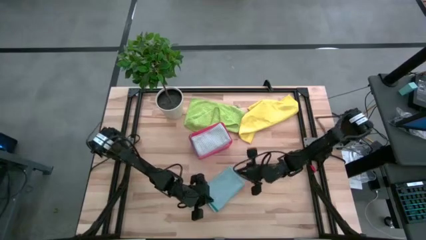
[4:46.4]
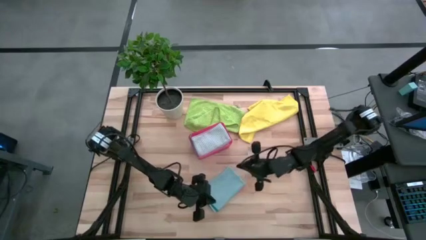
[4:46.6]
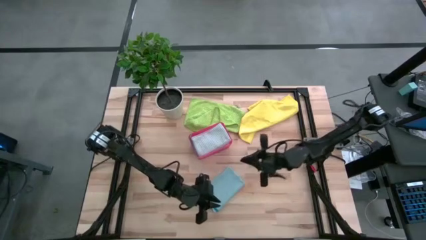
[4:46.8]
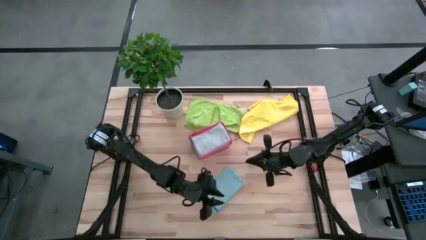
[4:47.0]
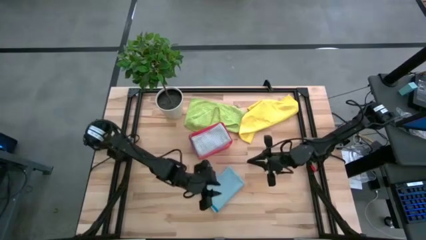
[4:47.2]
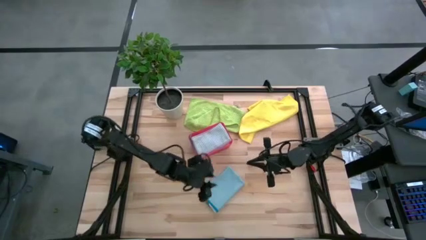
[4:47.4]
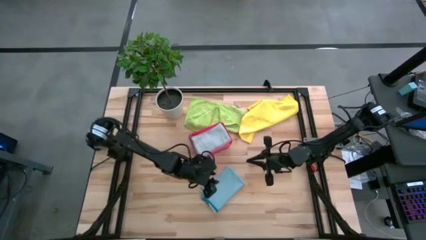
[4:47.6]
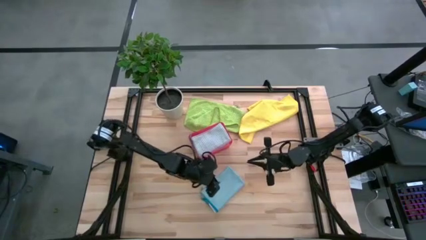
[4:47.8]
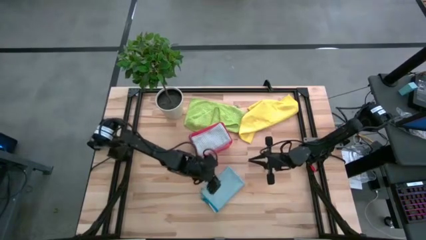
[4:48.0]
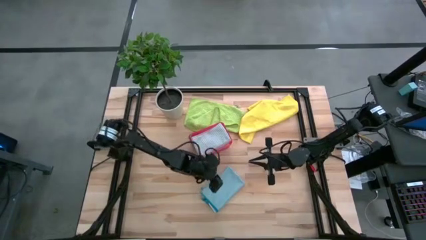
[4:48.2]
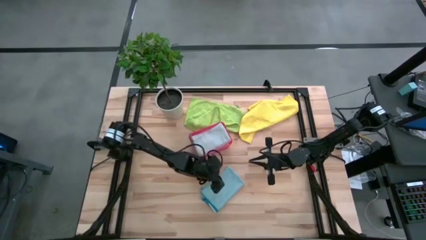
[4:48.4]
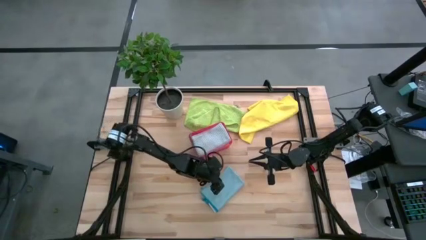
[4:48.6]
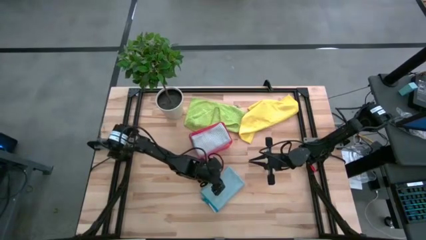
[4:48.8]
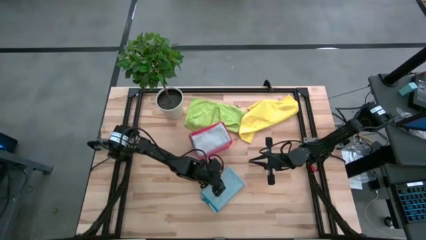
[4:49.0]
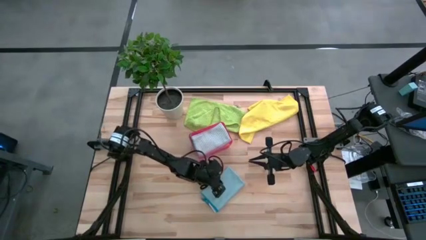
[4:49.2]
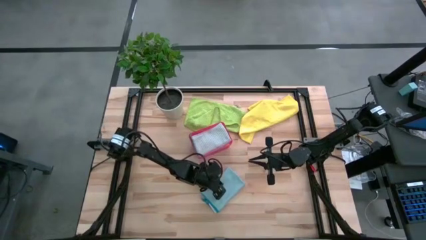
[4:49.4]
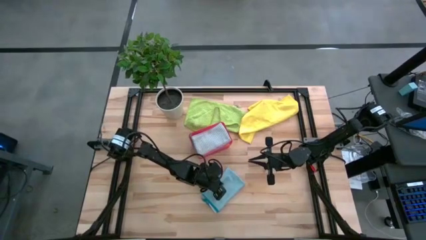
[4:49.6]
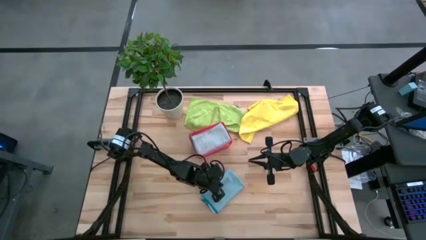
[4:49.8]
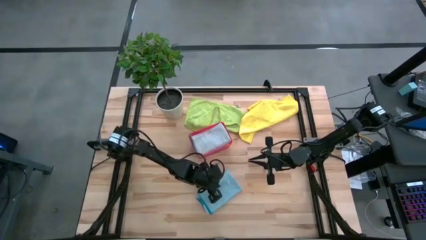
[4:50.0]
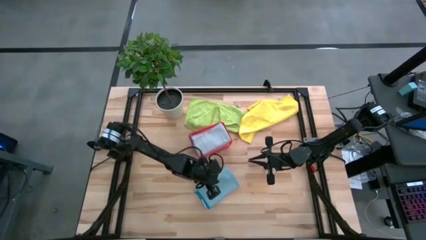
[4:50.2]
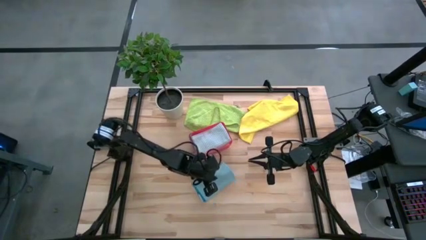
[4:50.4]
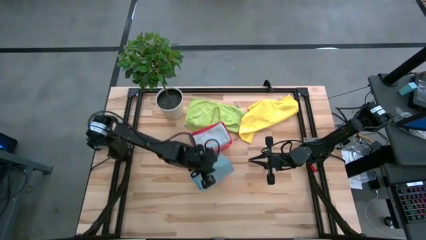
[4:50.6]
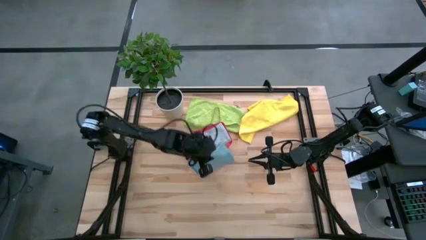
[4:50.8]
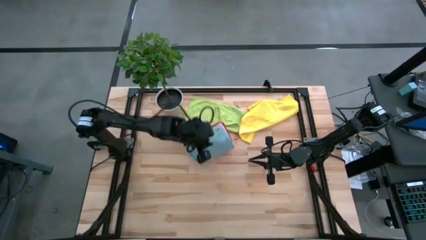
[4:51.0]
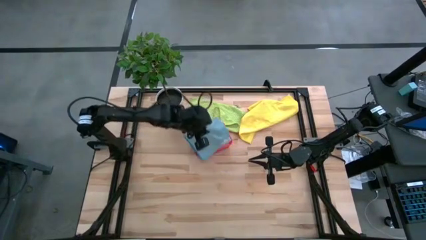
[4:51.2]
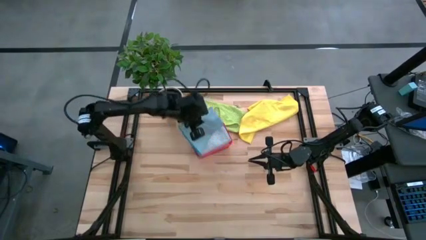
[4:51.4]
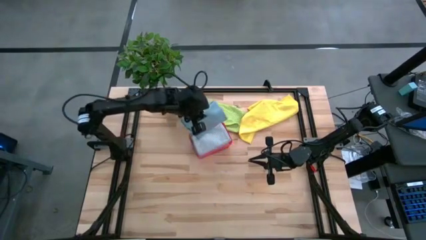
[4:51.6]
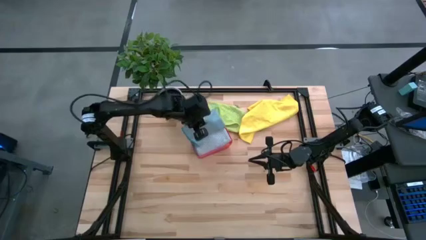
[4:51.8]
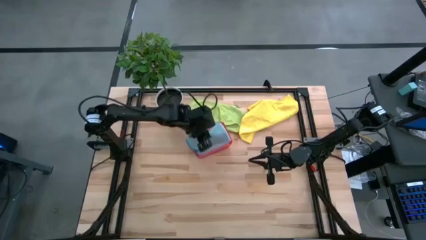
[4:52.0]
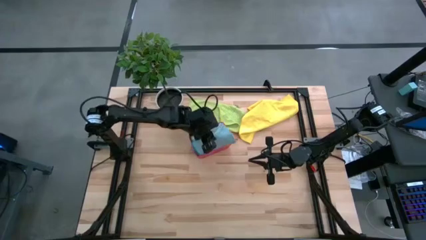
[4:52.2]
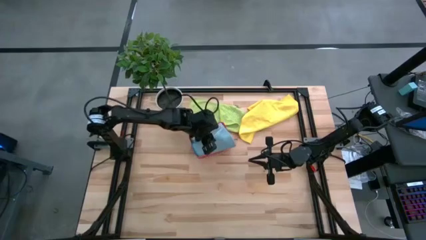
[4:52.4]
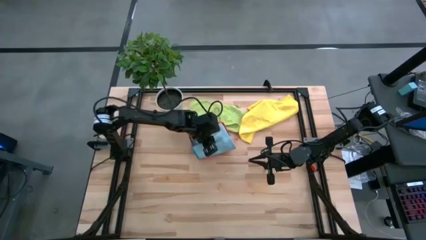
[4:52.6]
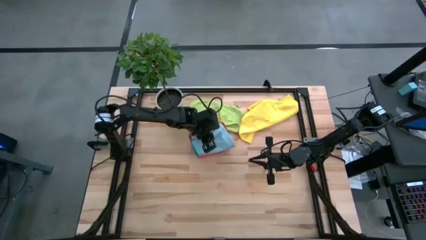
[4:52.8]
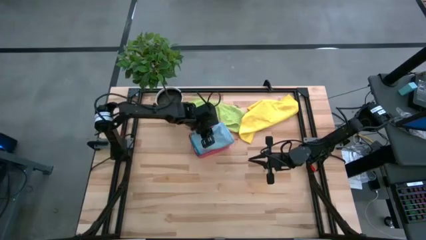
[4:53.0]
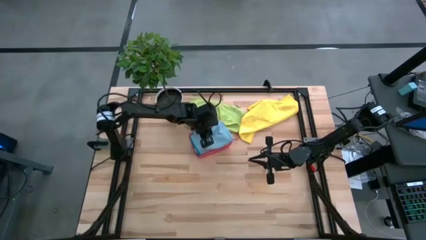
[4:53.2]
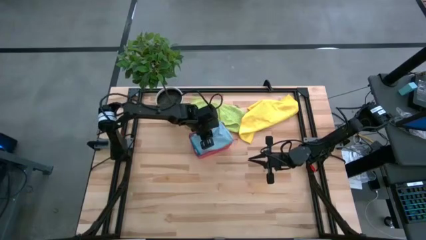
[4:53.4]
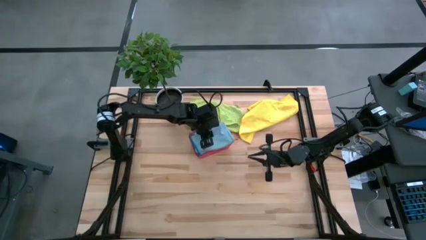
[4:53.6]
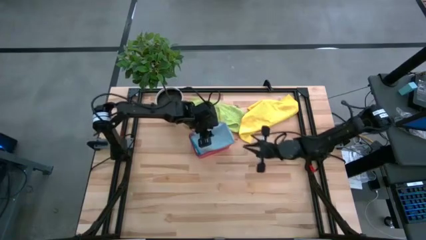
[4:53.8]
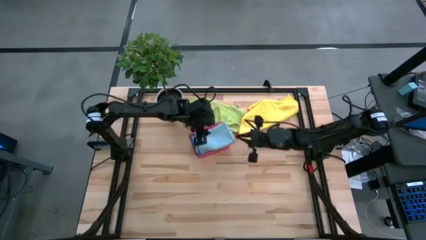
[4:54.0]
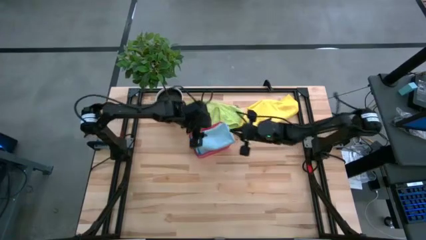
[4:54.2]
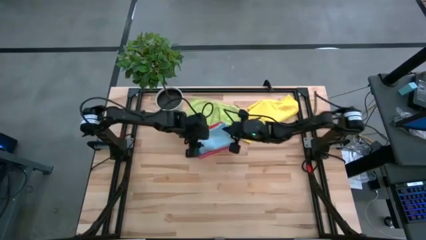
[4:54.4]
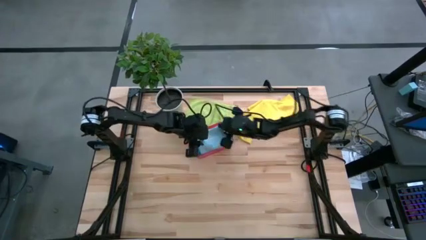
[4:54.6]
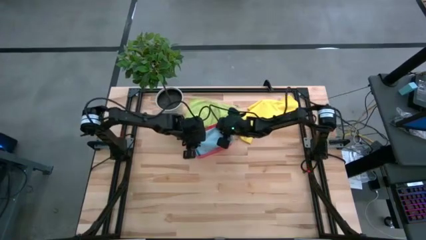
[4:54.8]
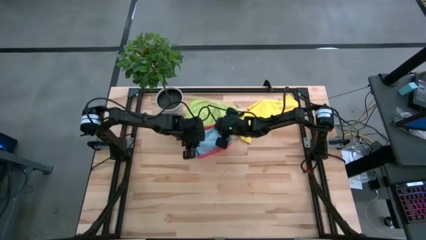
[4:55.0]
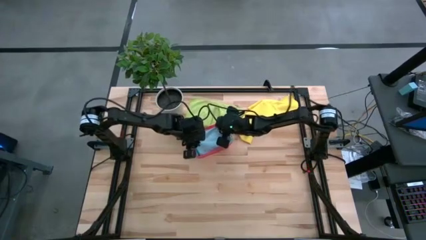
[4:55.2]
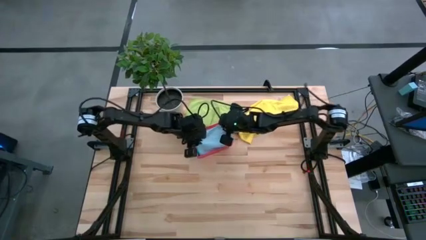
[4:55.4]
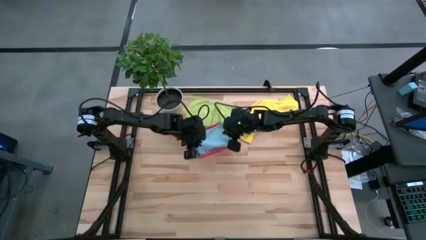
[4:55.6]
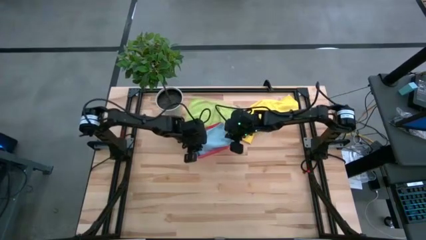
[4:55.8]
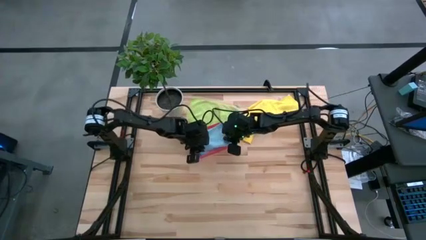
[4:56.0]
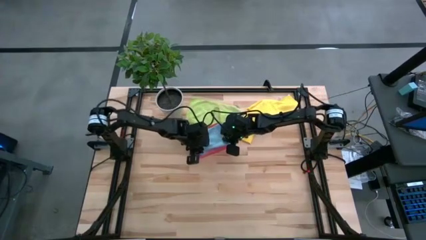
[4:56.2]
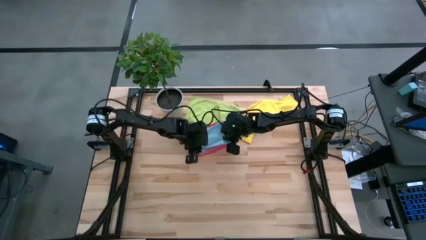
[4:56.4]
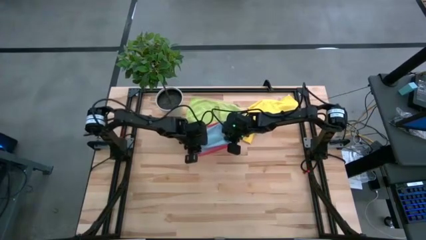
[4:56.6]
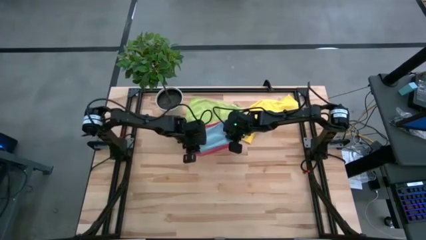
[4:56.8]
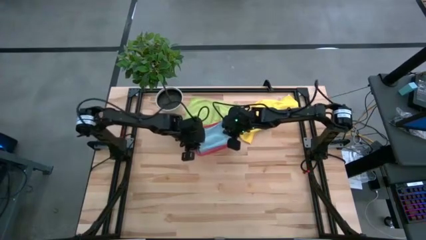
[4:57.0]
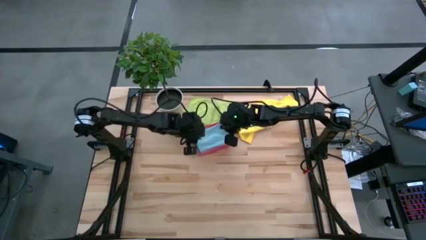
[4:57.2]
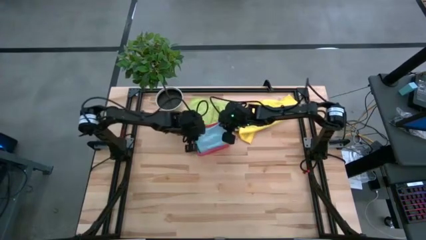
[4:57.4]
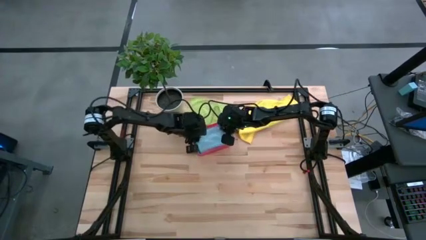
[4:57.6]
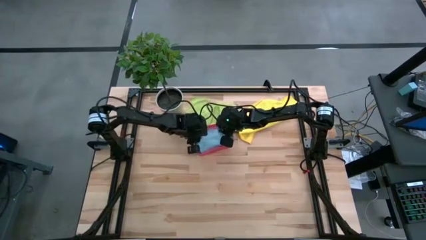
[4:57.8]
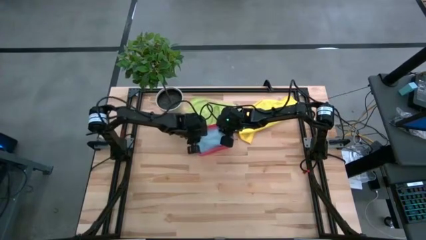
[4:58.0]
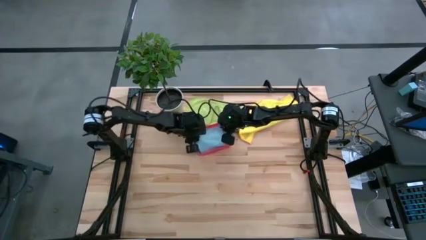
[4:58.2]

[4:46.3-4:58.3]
Task: Fold microfiber towels
Put the folded blue microfiber cloth into the pink bin

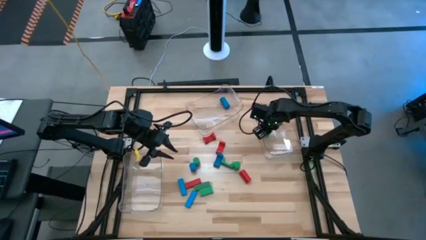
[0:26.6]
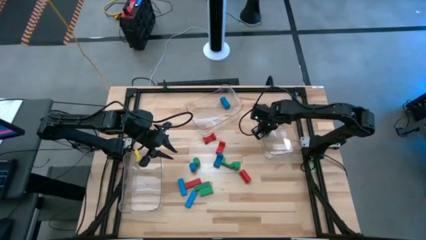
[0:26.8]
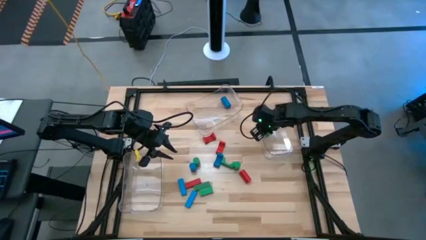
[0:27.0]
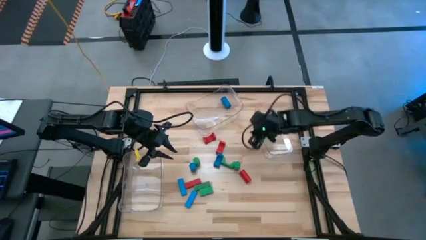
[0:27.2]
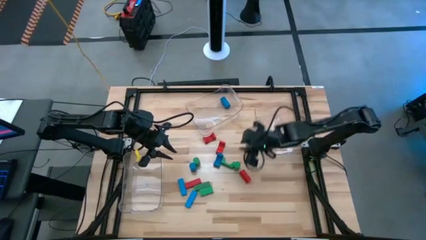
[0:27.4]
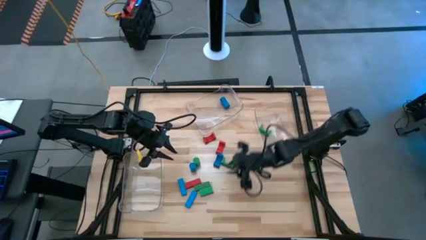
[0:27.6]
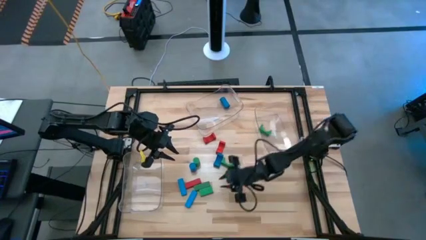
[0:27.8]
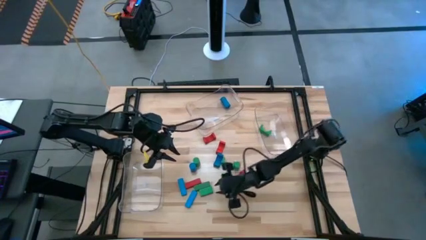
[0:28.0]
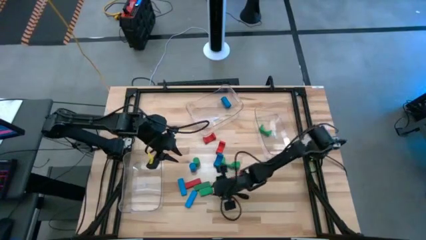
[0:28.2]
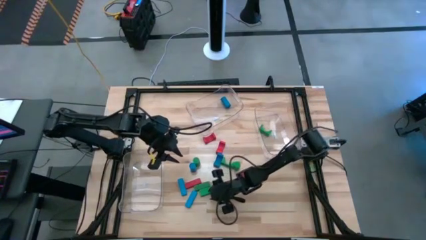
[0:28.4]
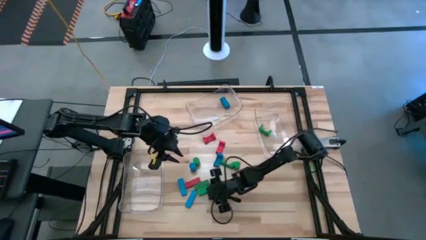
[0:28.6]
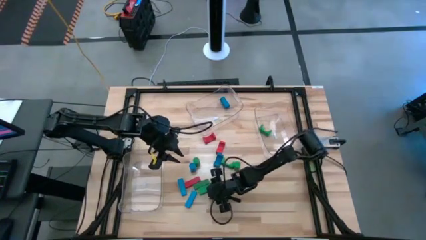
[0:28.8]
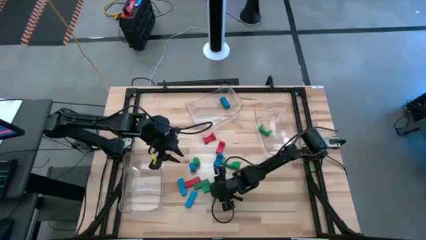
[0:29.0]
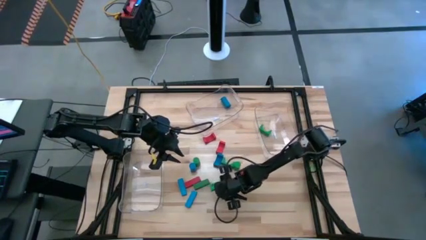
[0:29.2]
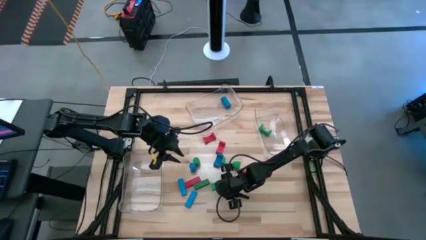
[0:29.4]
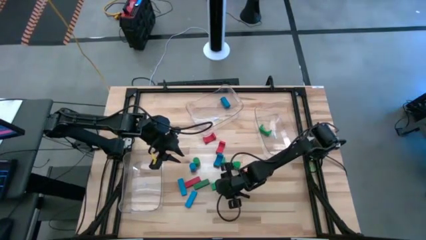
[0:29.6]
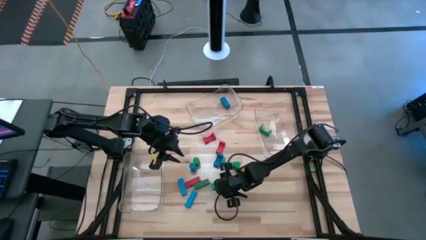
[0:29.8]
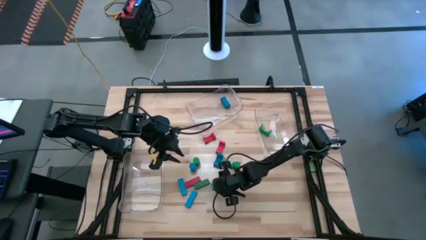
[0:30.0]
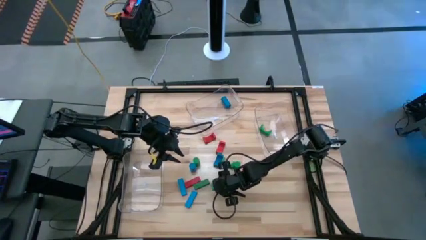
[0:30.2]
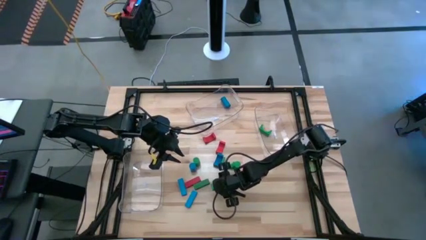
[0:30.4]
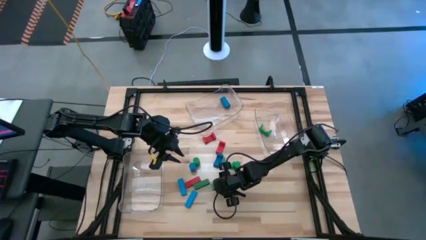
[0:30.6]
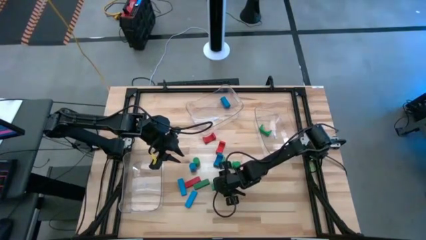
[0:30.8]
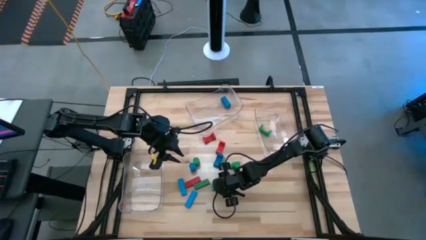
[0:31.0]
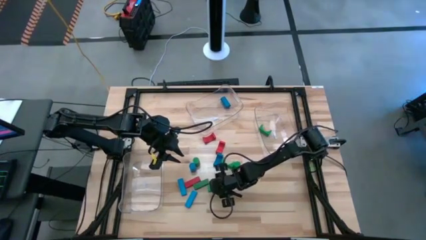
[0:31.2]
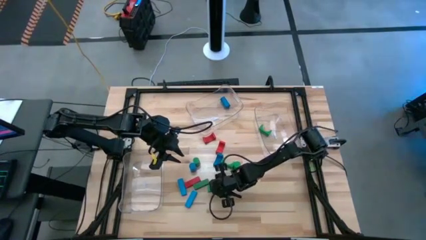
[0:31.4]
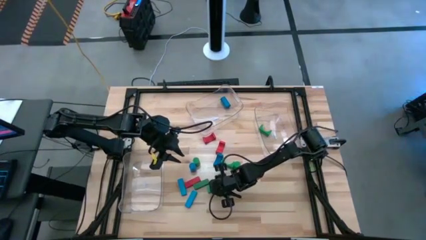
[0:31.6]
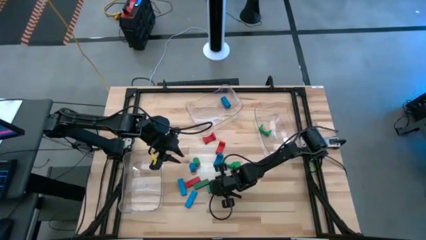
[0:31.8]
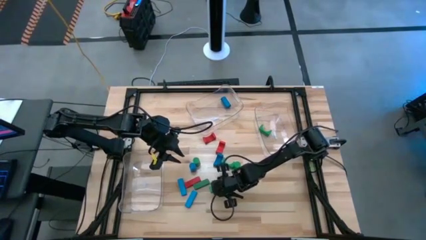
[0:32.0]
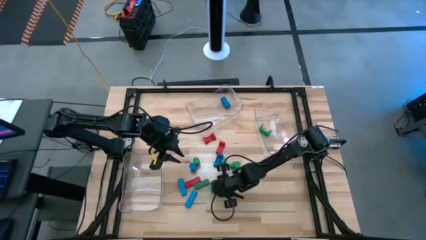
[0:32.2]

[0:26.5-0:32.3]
Task: Sort blocks by size
Put the bottom green rectangle block into the left transparent bin
